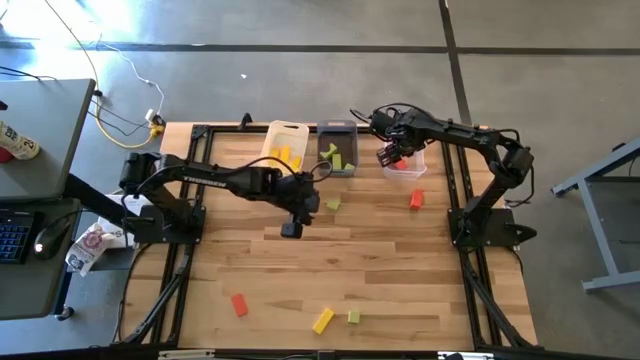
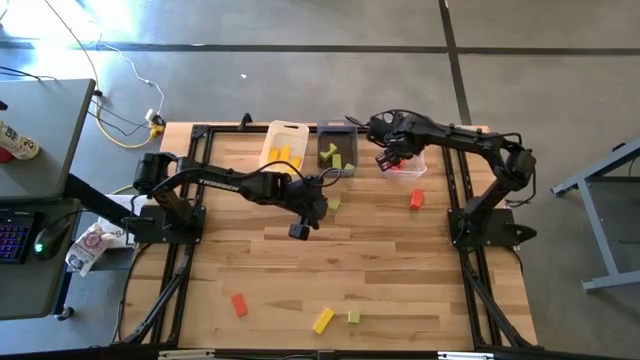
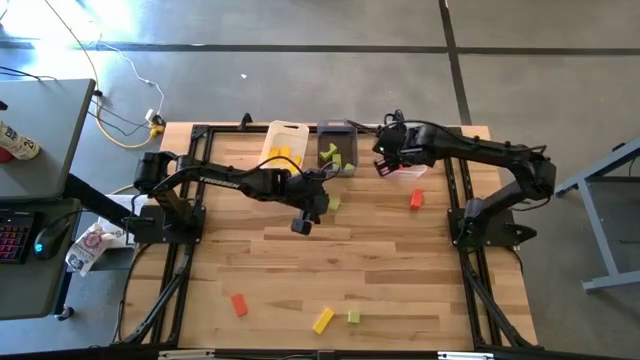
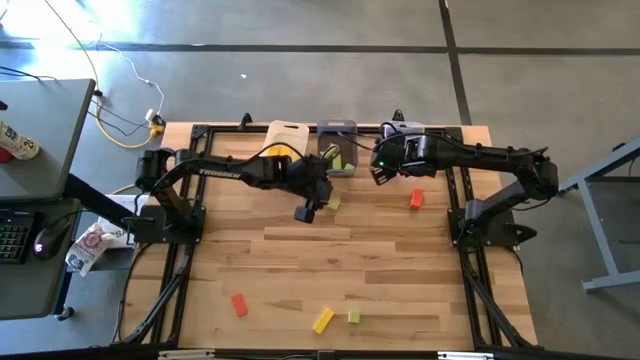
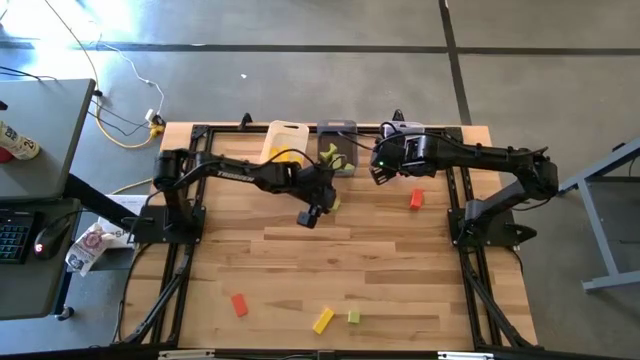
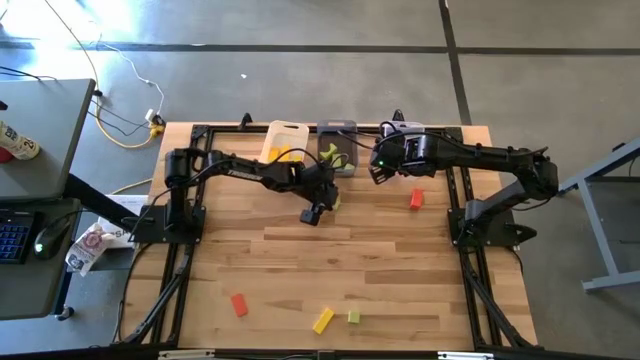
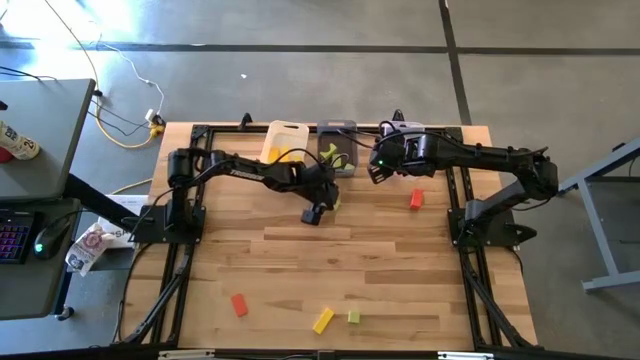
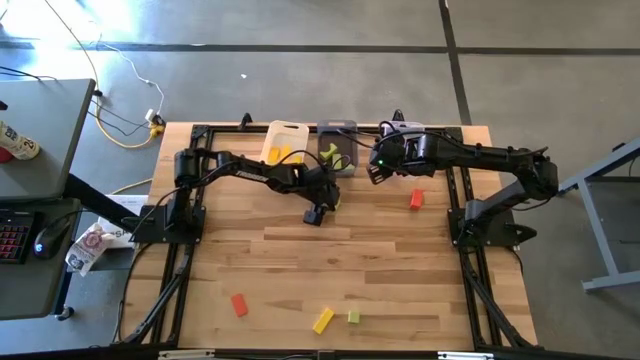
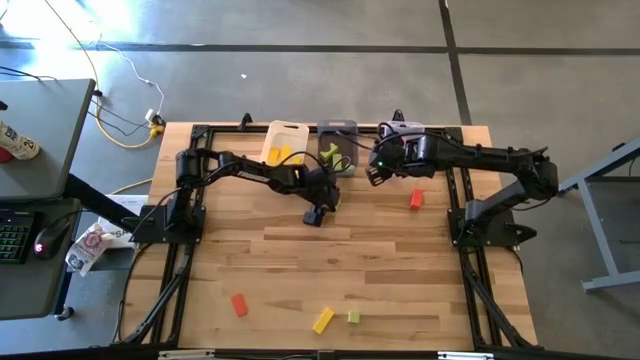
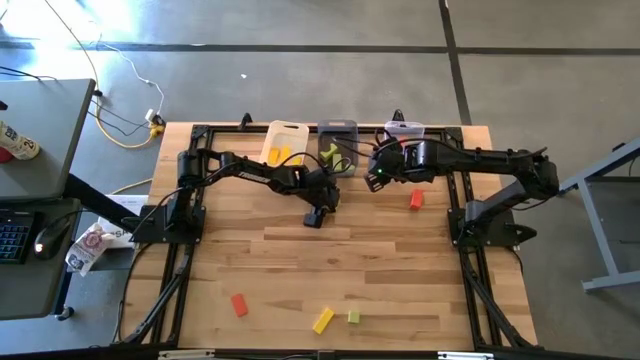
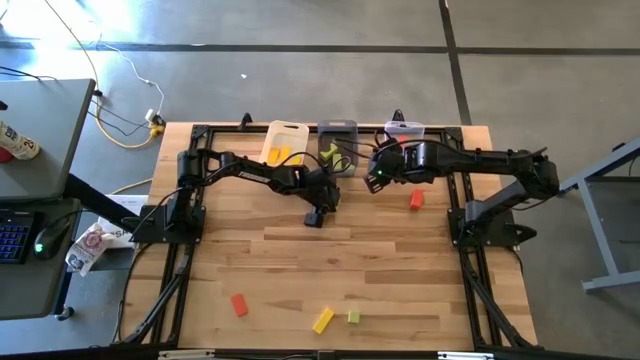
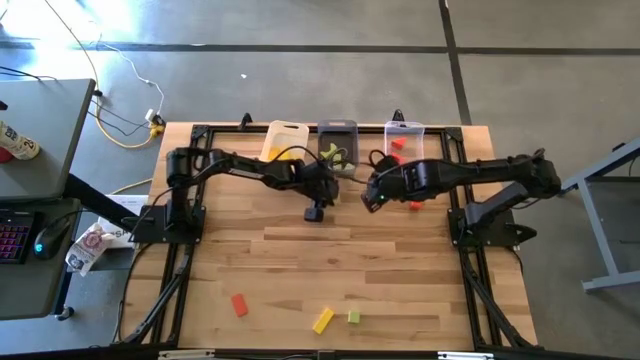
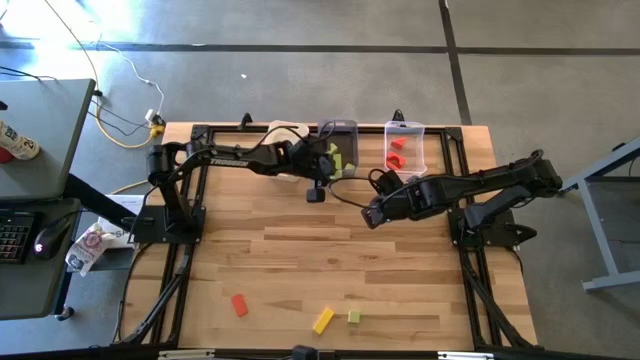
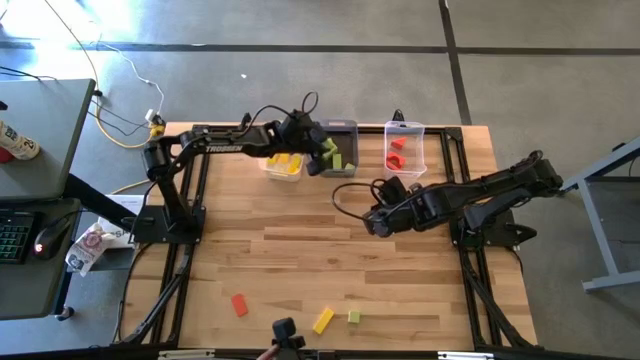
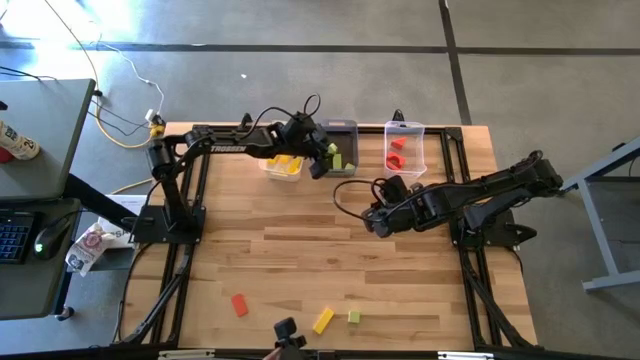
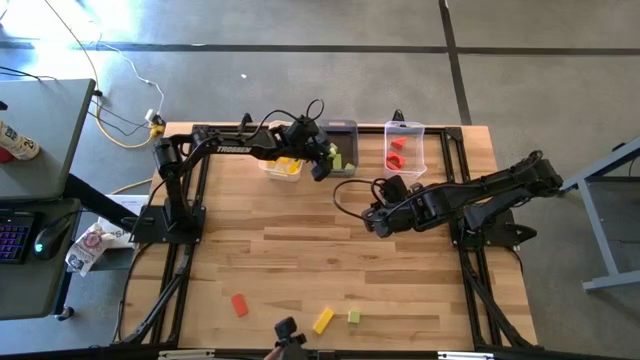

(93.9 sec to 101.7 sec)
Task: Sort & place blocks by color
Put the green block into the black bin

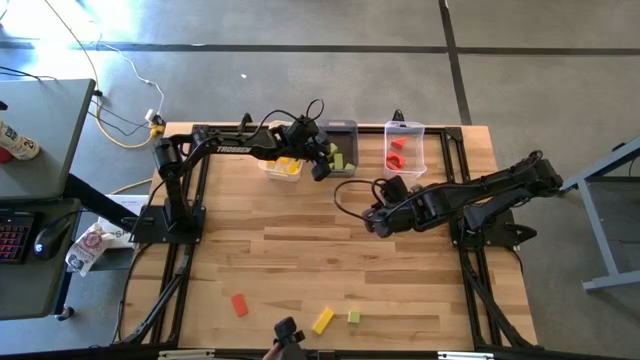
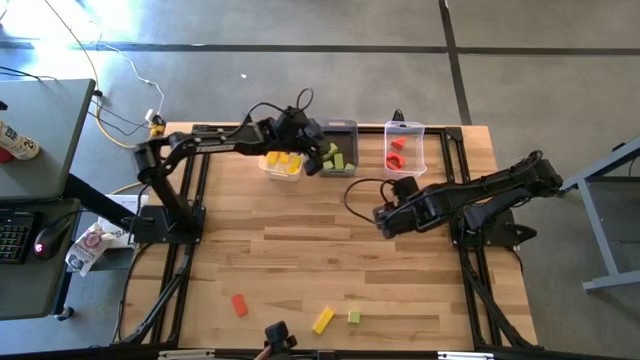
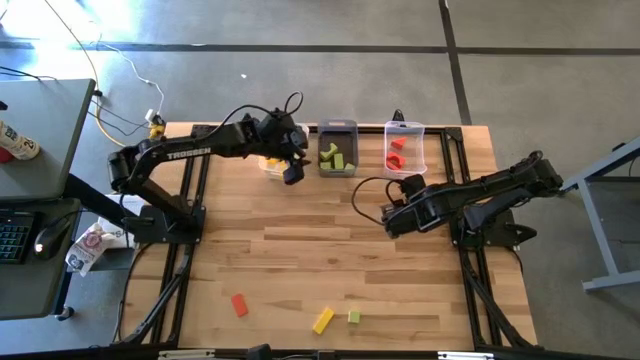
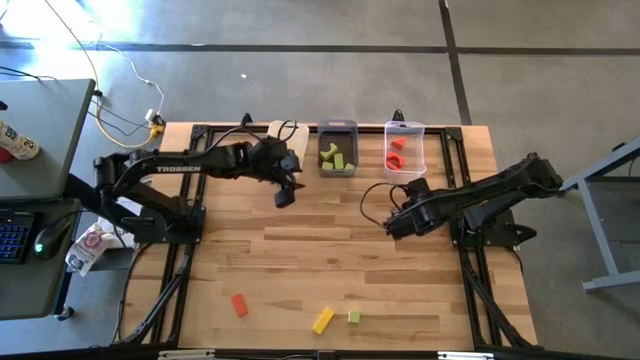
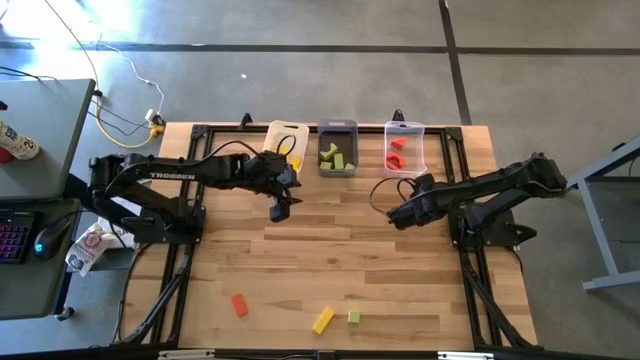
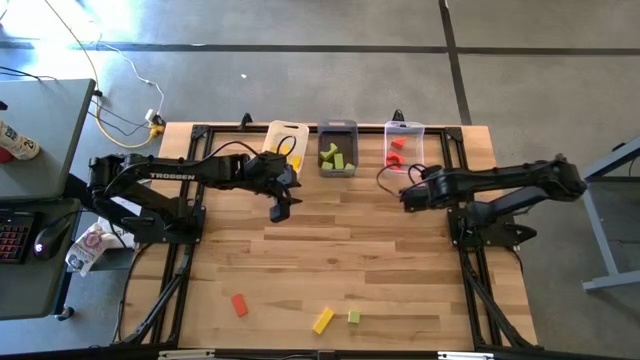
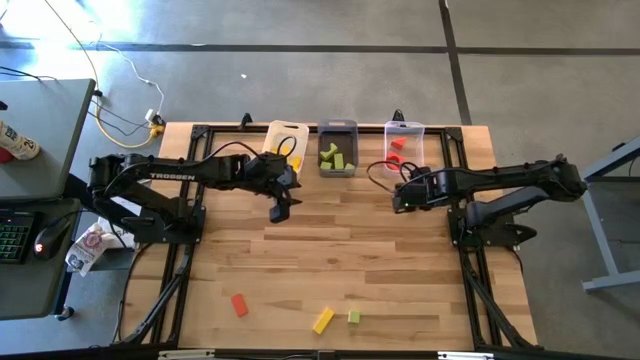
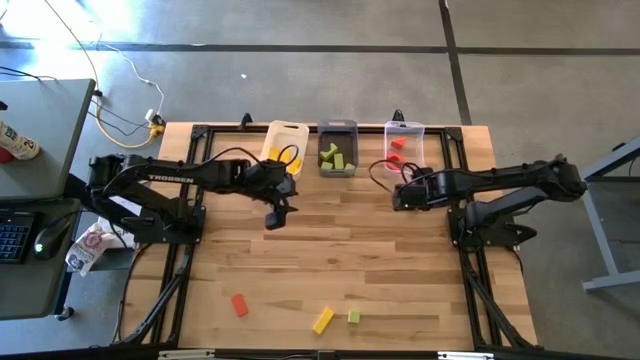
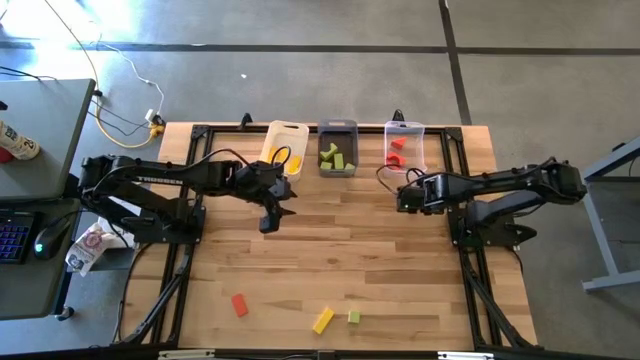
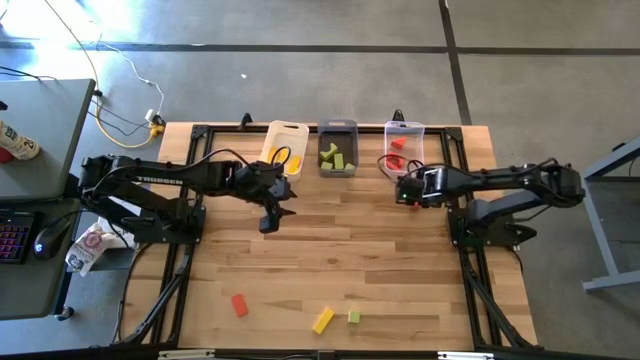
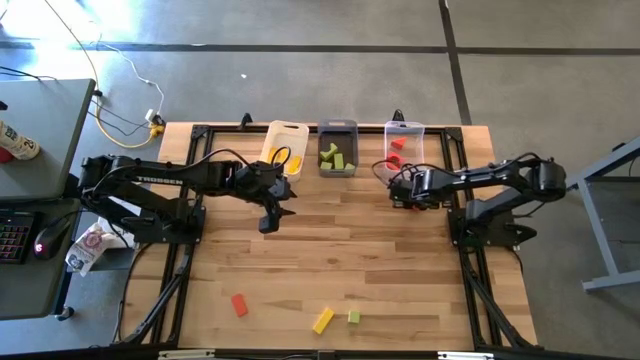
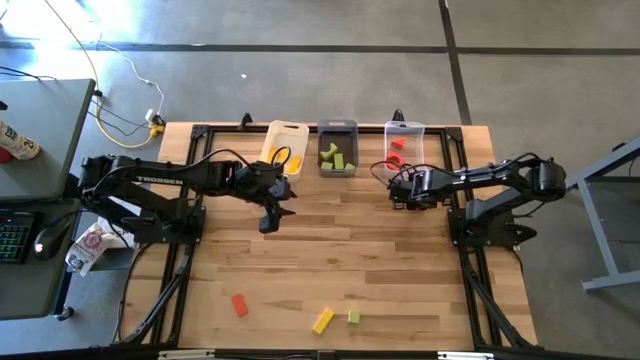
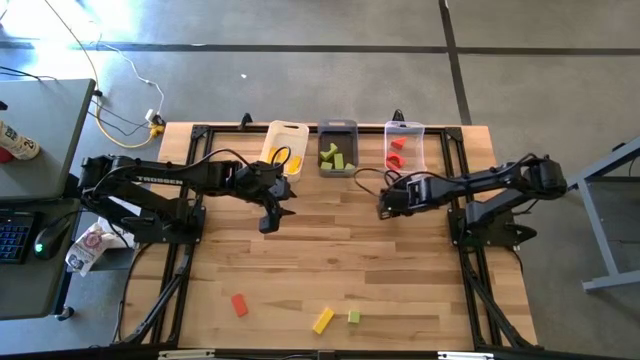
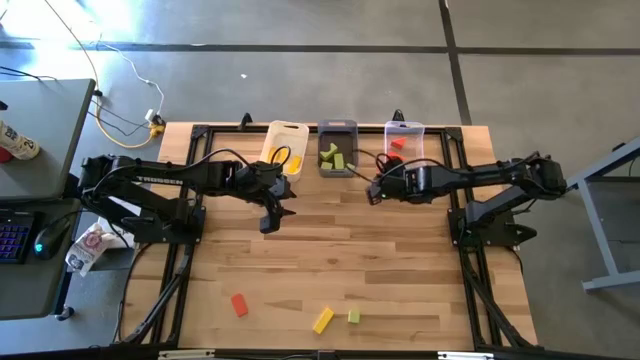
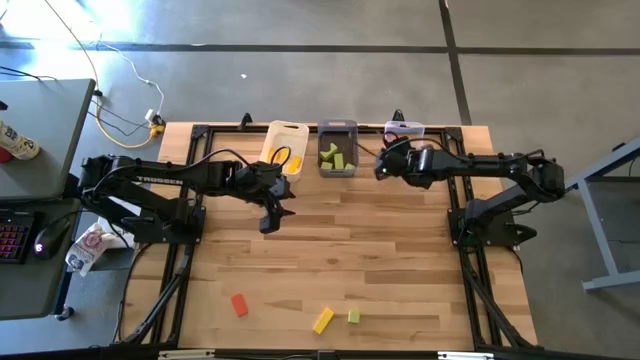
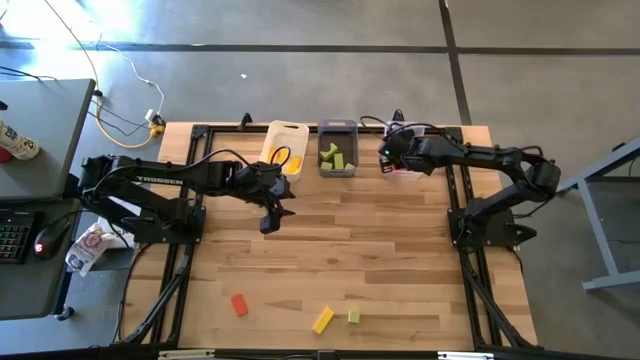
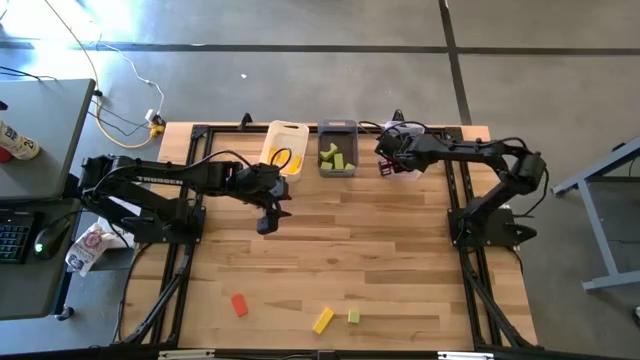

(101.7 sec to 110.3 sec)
Put the orange block into the transparent bin

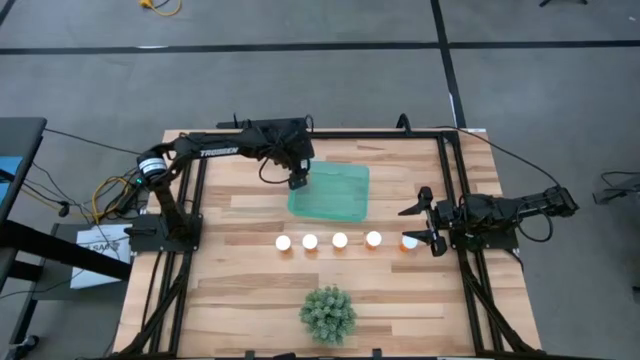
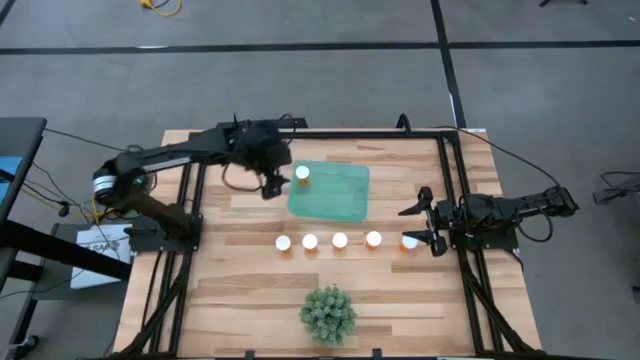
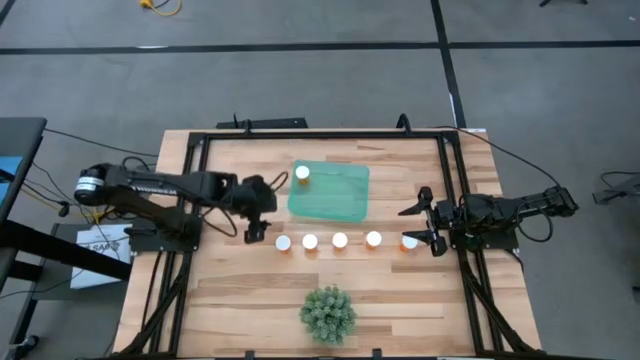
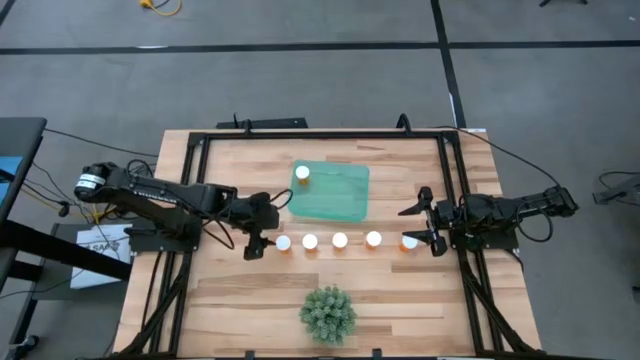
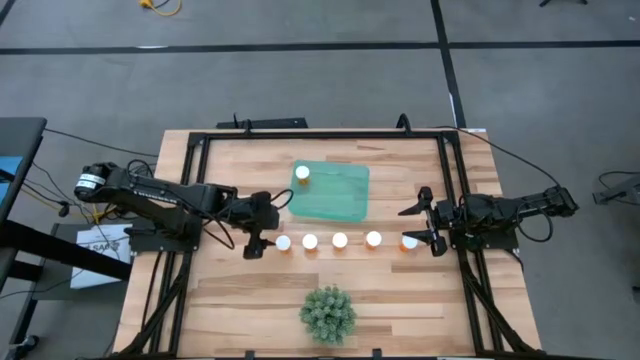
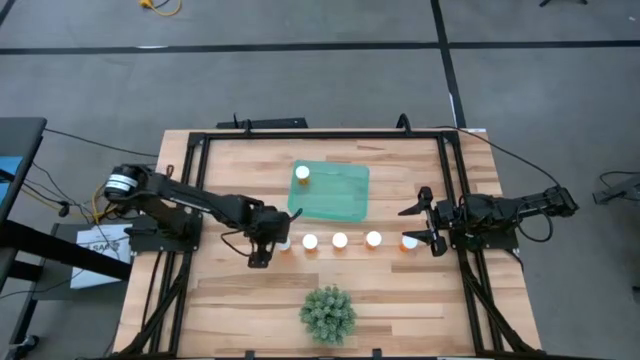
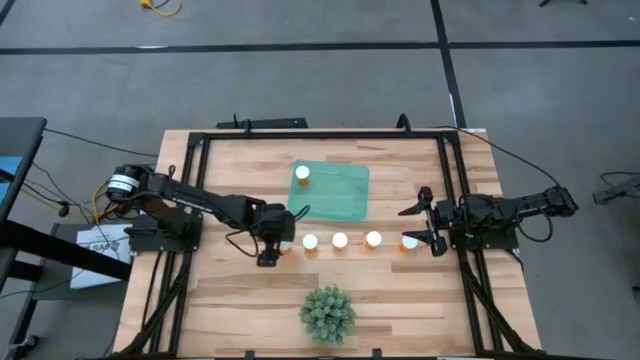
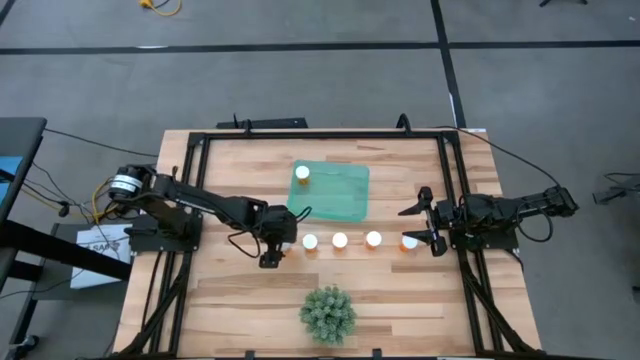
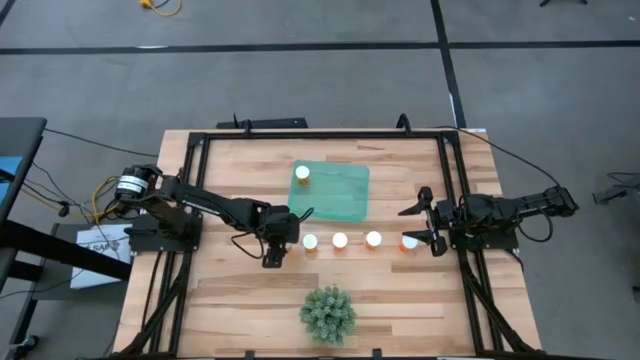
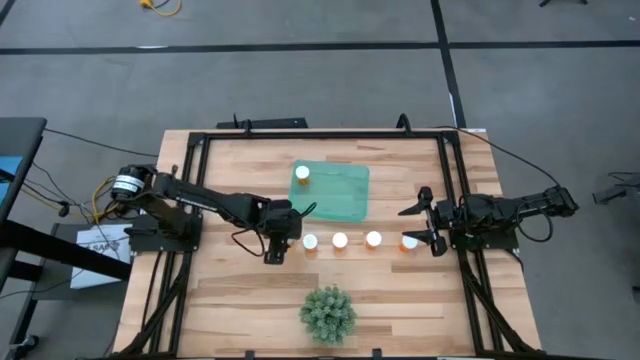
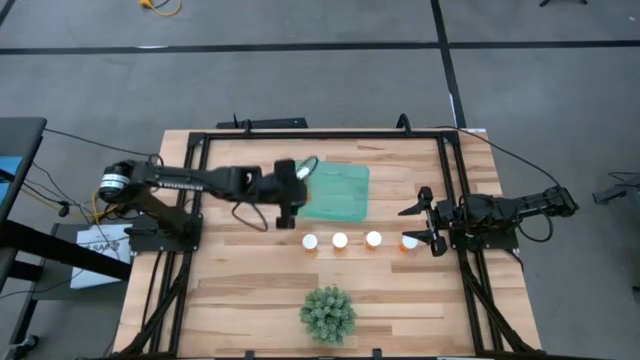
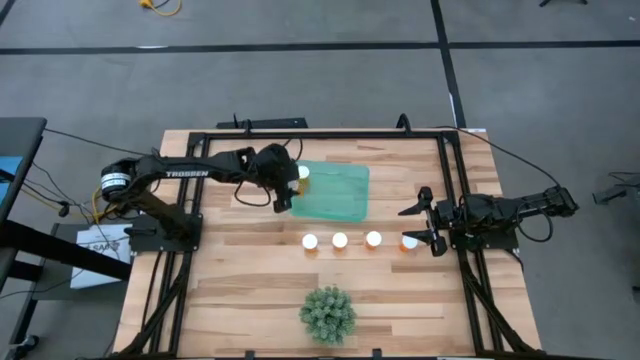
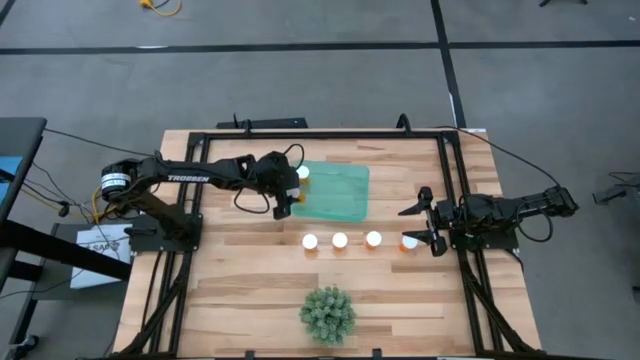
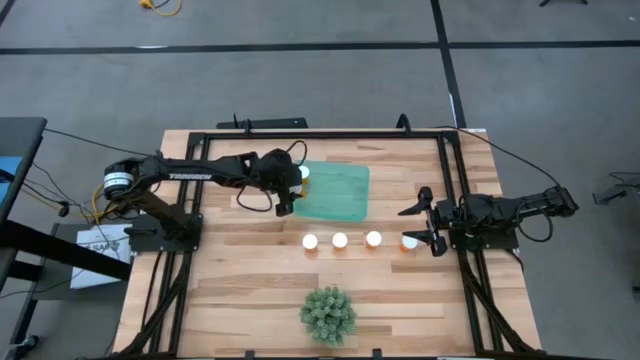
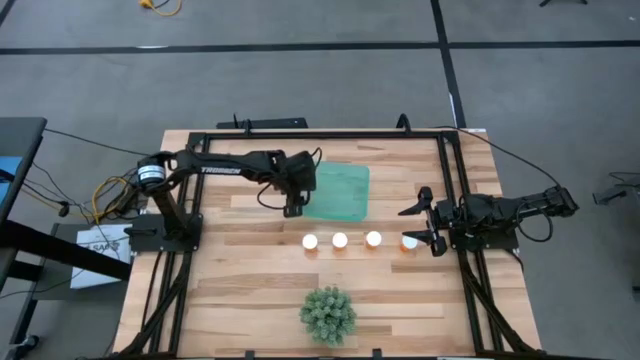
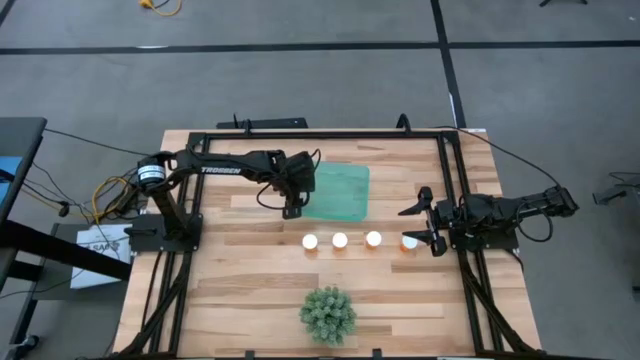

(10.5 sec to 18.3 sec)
Task: Pick and place pill bottles into a basket
Put the orange pill bottle into the green bin
